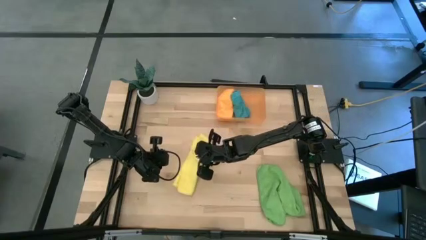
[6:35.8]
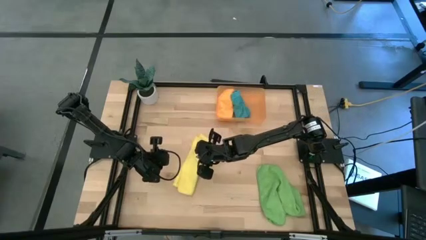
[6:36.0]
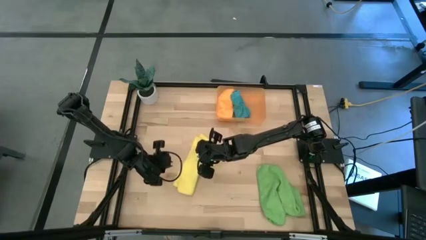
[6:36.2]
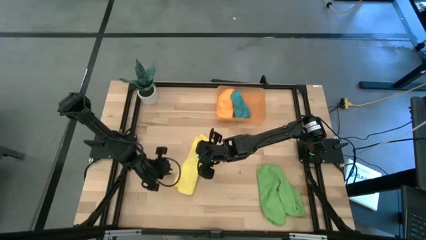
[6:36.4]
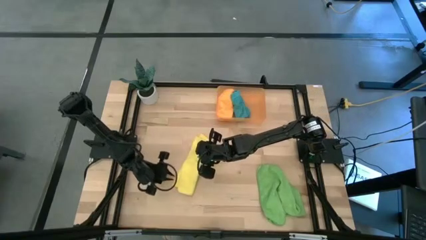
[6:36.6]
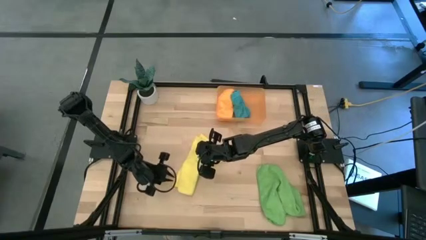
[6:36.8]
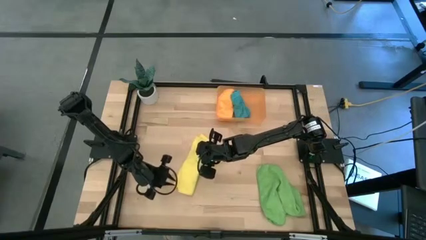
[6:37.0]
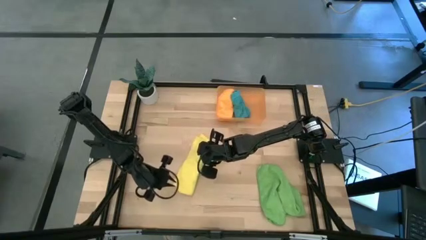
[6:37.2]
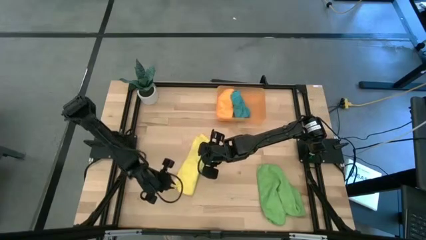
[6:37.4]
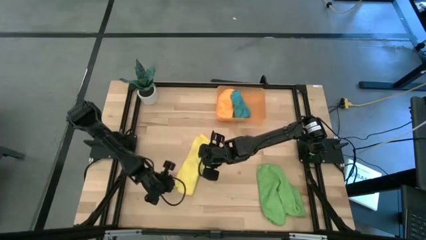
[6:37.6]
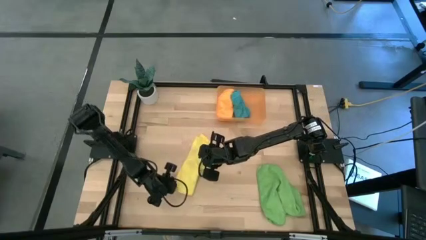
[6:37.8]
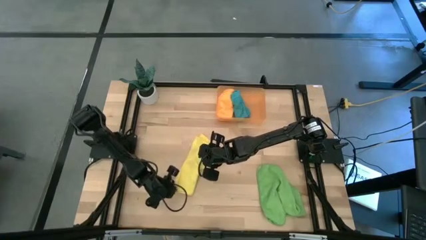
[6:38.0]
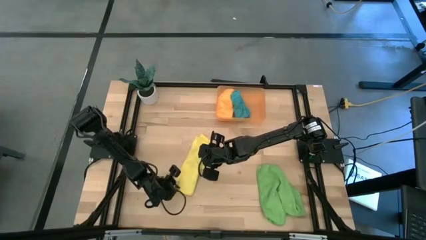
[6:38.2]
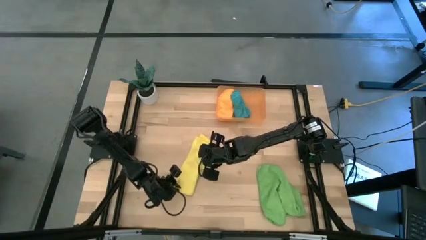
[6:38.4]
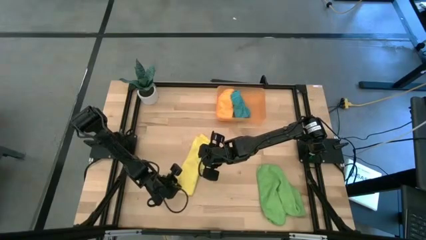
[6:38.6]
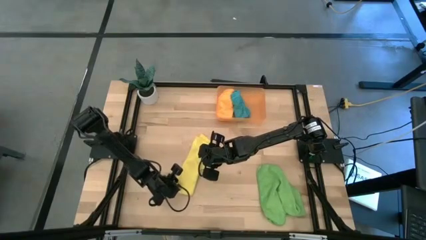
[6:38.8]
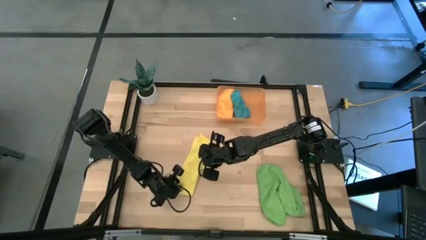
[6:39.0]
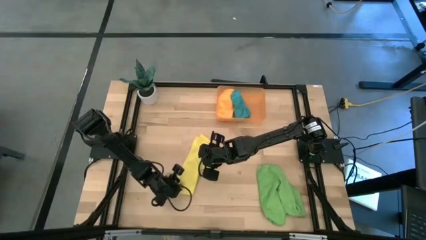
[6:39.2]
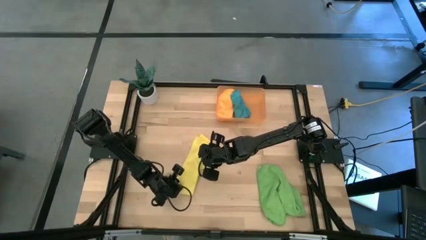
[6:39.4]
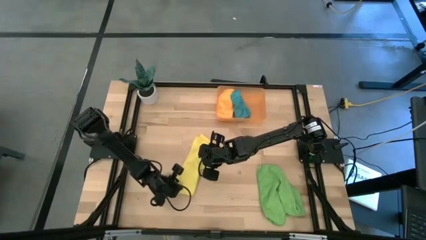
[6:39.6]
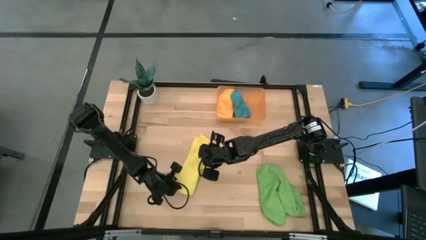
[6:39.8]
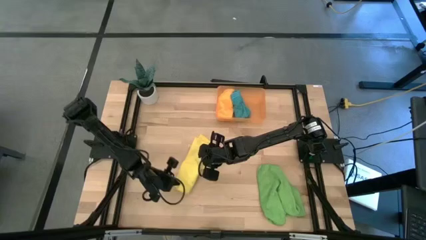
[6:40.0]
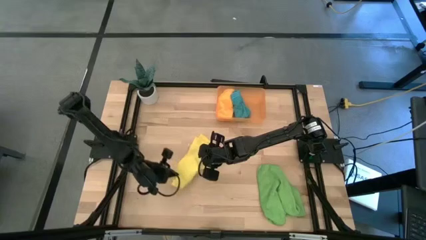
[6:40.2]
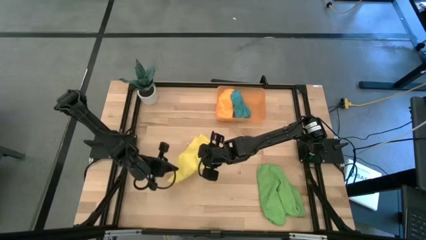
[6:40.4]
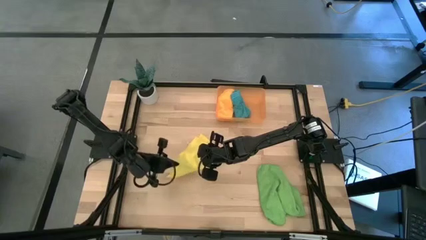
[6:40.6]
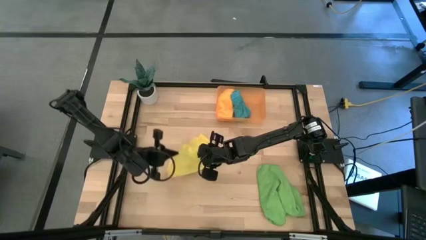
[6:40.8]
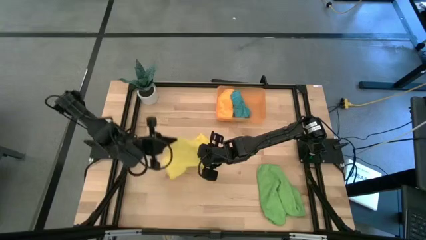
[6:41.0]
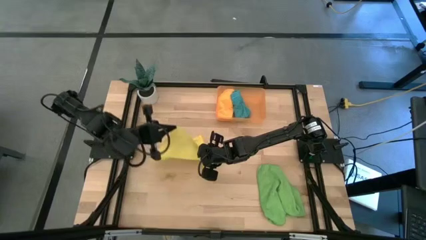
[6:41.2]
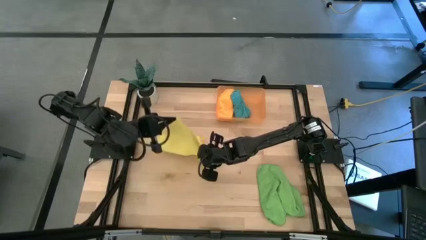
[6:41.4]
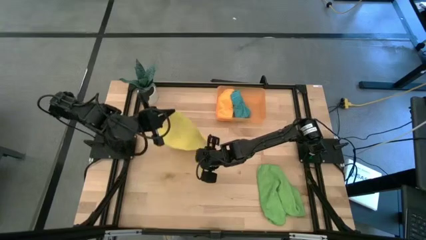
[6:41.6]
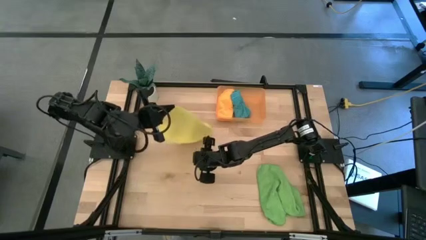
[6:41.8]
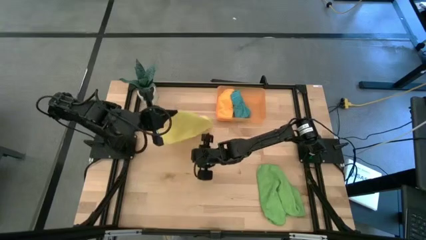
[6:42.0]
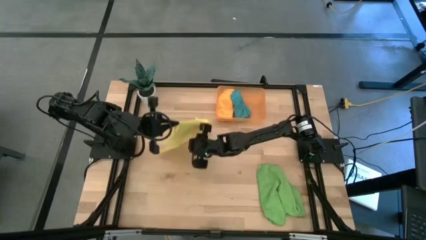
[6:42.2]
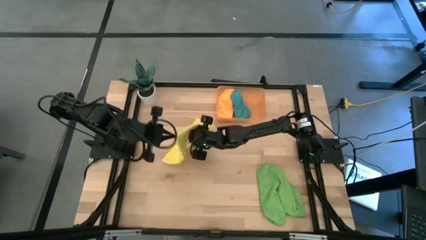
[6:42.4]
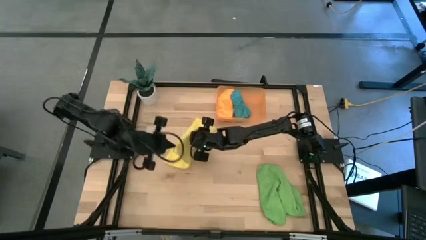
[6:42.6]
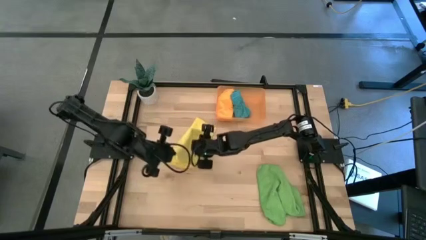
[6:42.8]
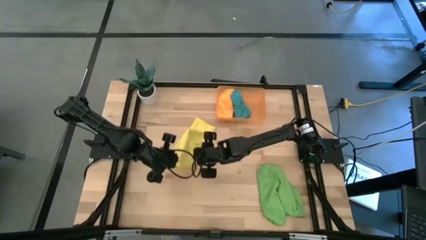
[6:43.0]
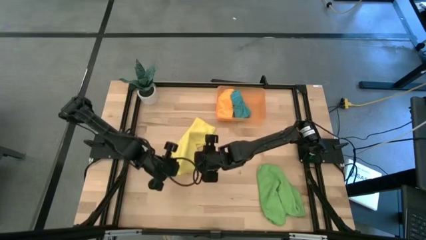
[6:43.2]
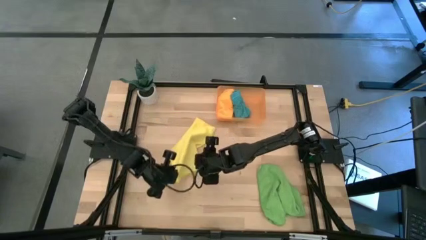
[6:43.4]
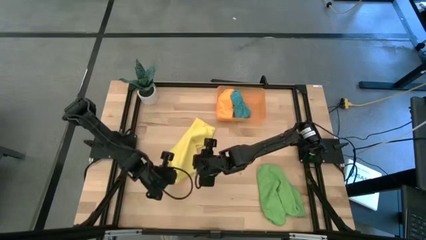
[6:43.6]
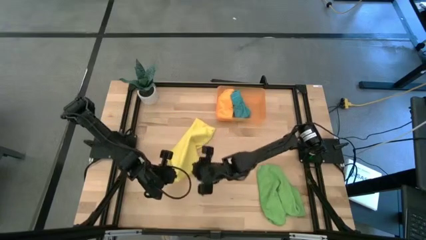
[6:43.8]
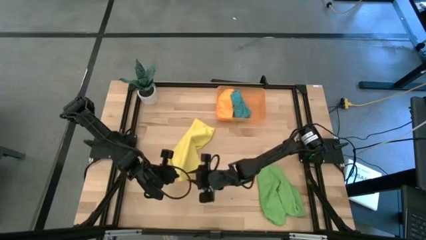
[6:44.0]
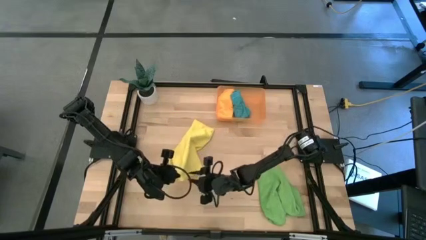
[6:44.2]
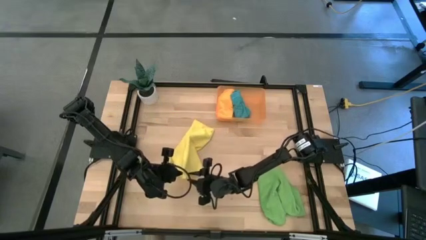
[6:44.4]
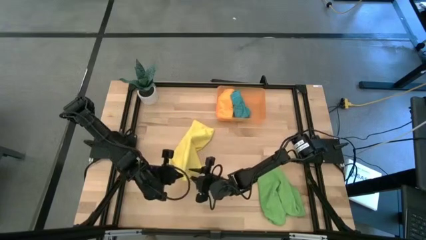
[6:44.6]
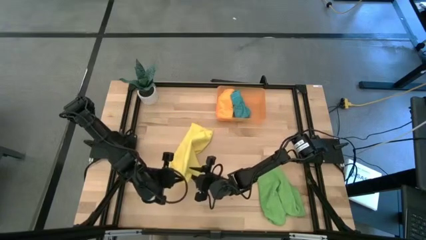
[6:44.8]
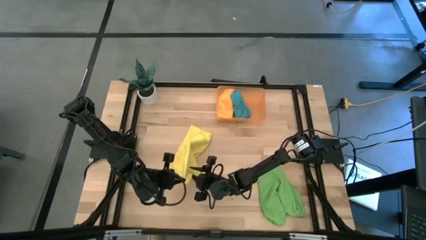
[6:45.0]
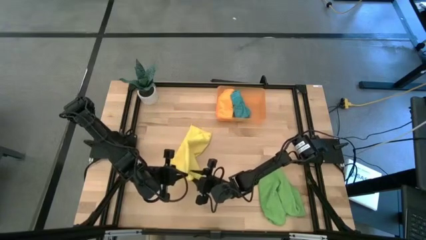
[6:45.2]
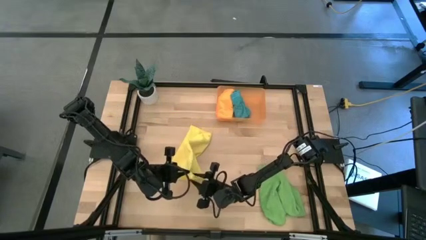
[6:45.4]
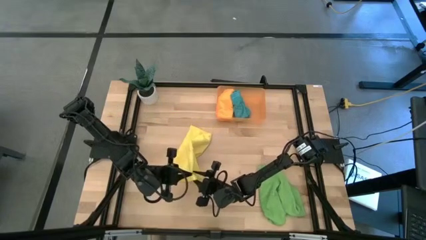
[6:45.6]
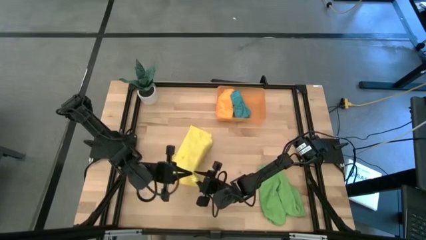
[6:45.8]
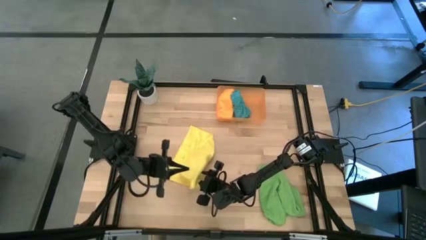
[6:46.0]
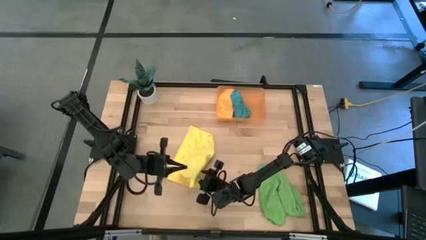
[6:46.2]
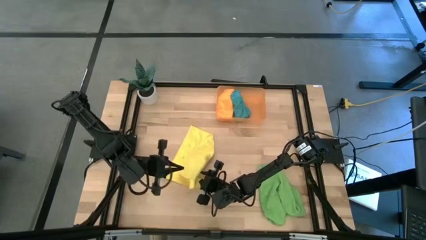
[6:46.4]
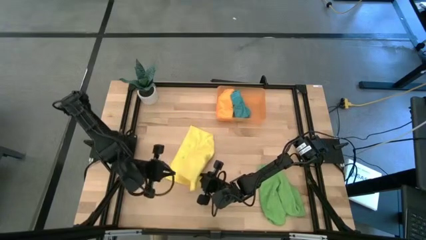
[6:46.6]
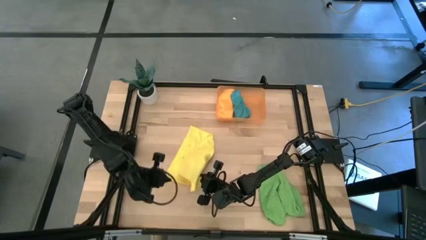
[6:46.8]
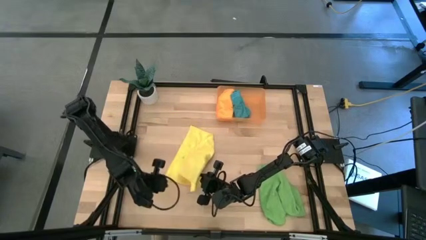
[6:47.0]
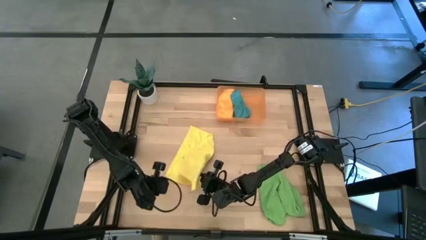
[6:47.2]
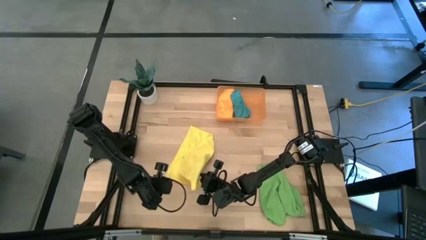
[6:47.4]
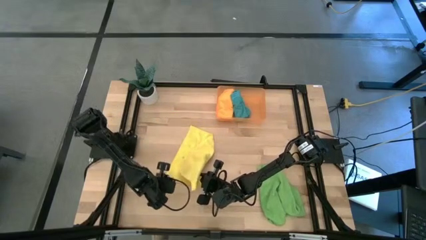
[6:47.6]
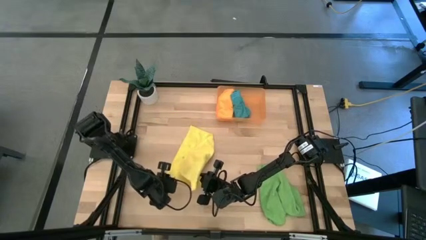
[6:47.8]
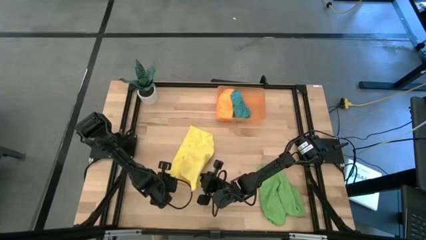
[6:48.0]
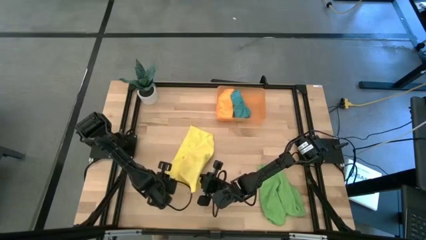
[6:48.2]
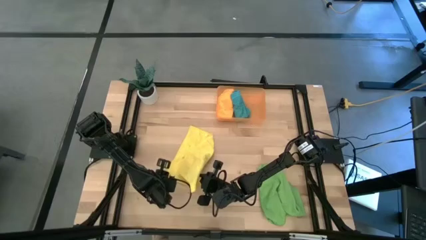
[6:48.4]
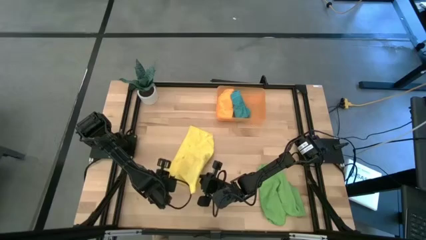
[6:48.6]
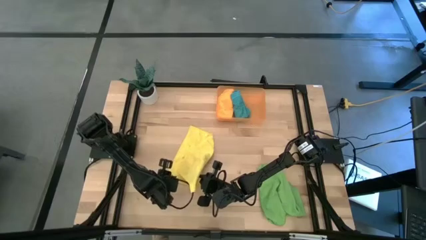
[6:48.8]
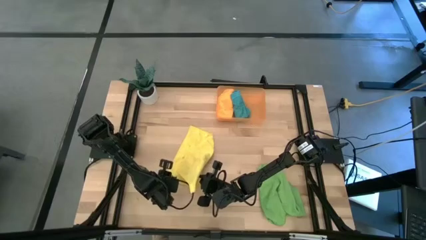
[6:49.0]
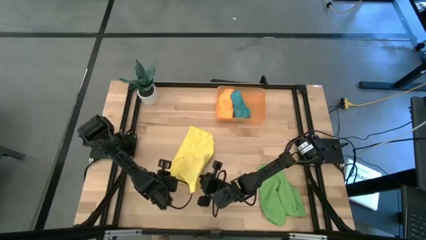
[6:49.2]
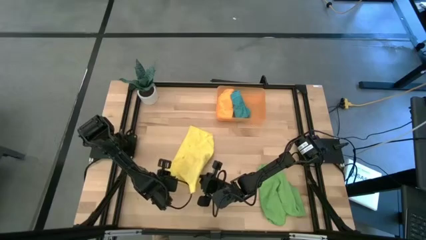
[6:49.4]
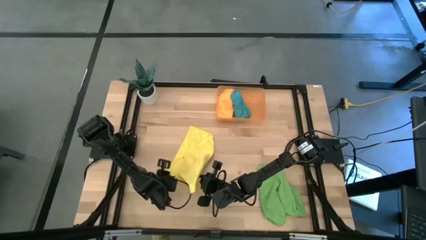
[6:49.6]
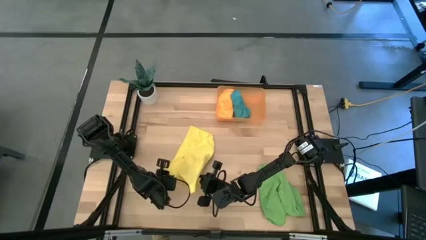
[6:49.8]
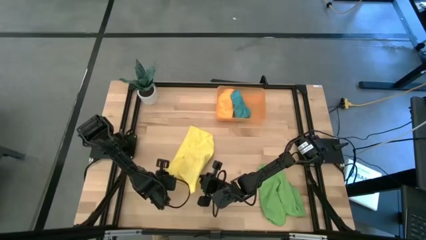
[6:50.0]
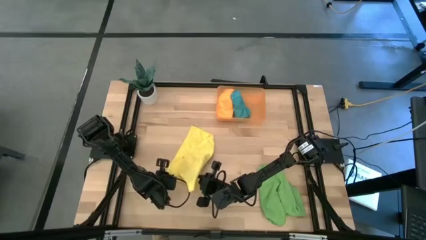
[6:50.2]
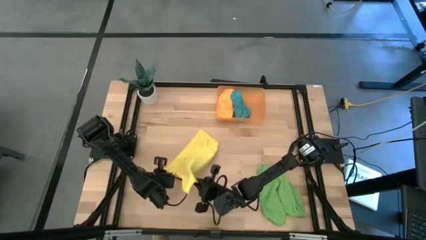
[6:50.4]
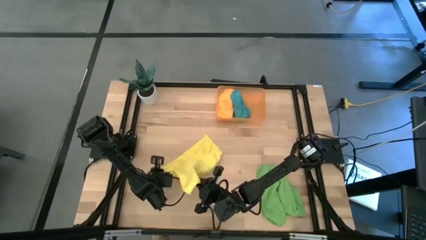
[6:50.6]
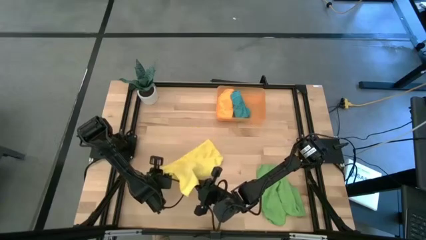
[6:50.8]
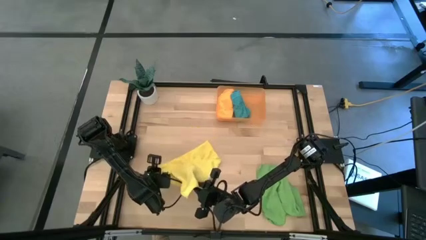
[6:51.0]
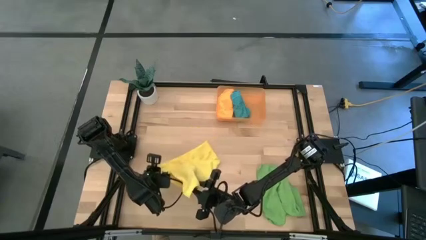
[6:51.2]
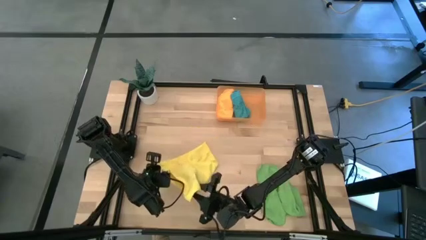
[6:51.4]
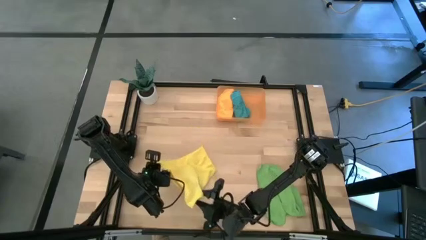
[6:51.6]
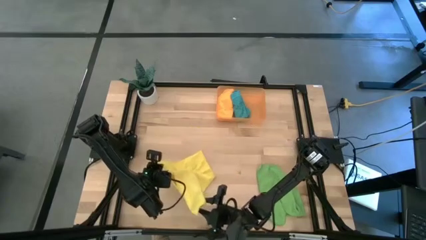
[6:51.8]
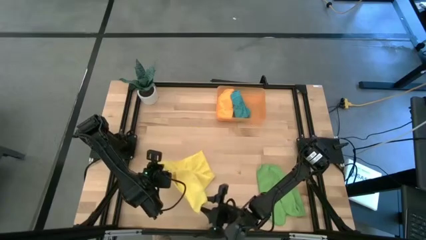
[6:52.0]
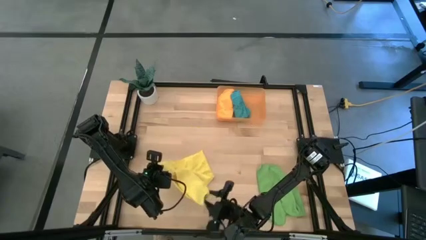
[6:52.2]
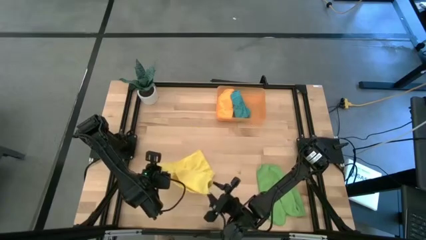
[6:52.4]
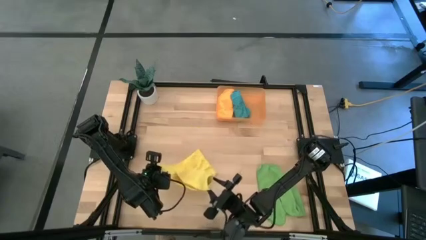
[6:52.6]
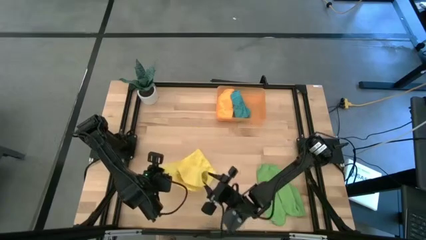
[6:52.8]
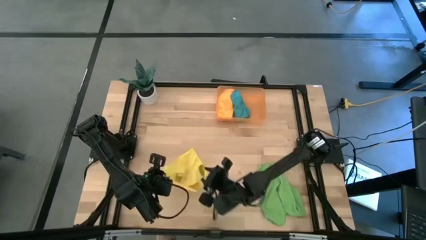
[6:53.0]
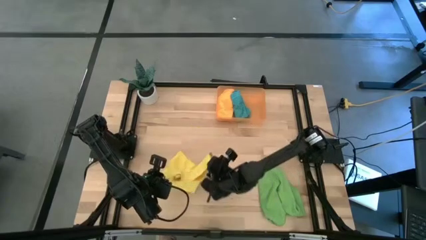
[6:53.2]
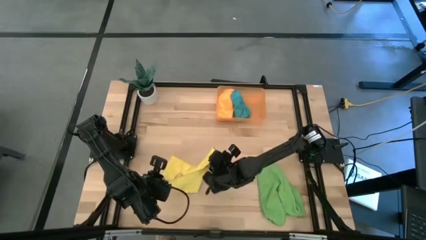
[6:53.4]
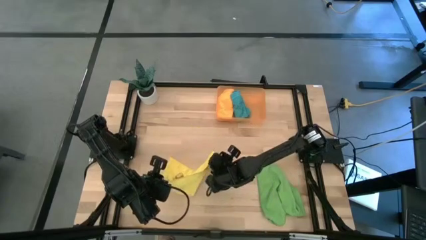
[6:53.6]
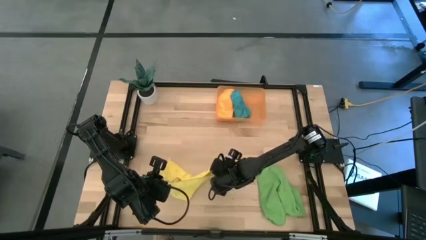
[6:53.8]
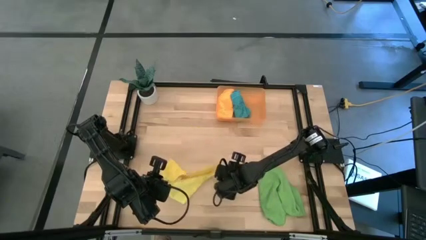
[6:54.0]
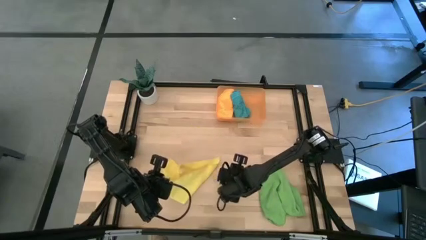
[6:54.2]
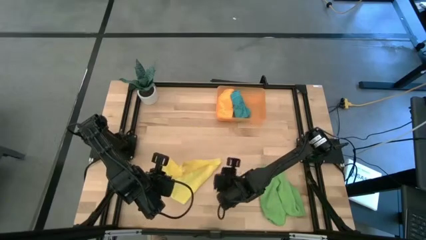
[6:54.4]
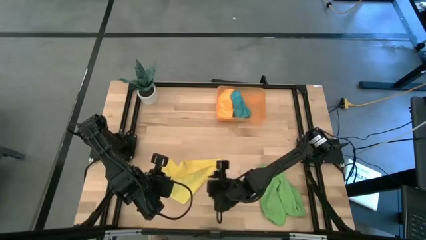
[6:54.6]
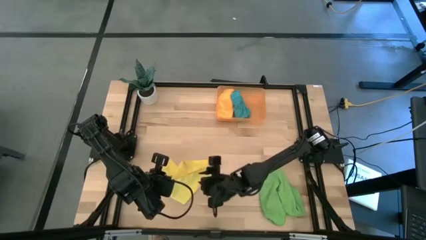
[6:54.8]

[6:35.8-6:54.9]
Task: Roll microfiber towels into tight, uniform cylinder then place into a basket
Roll the yellow microfiber towel
